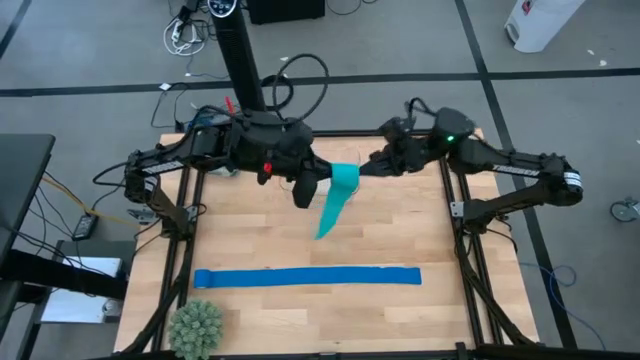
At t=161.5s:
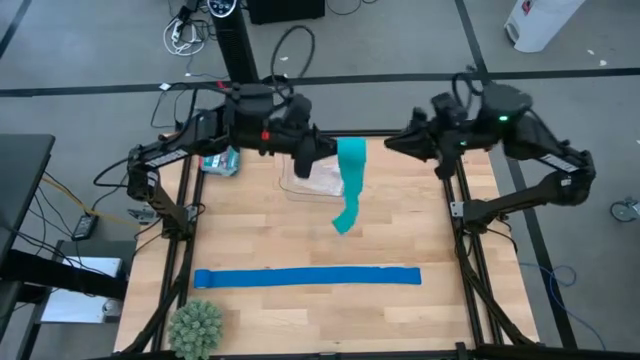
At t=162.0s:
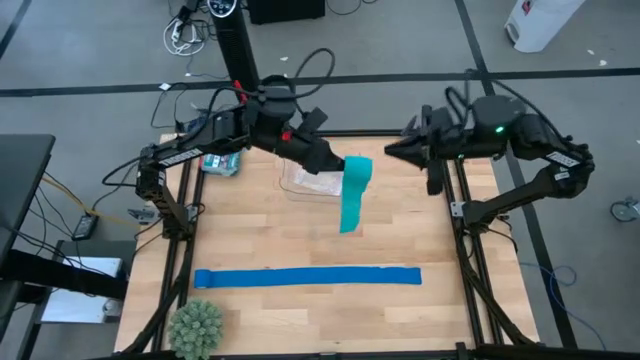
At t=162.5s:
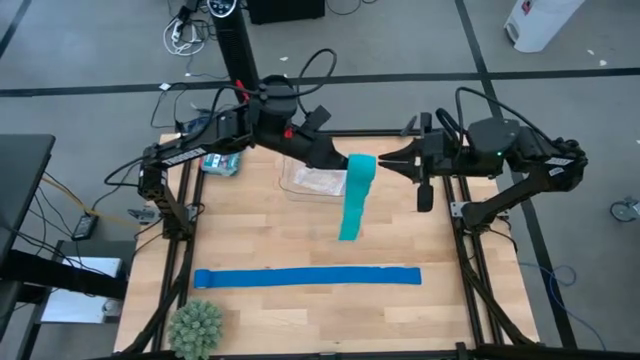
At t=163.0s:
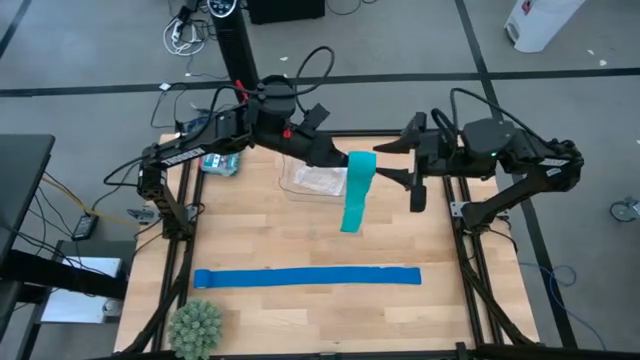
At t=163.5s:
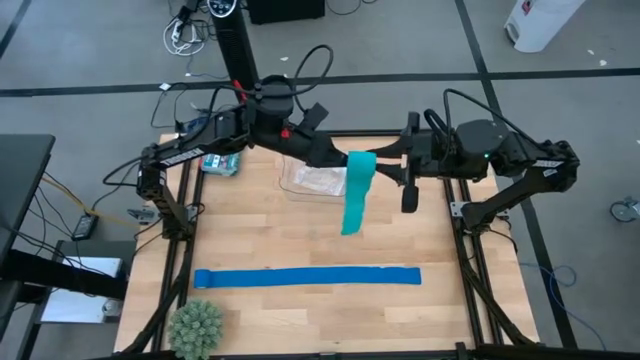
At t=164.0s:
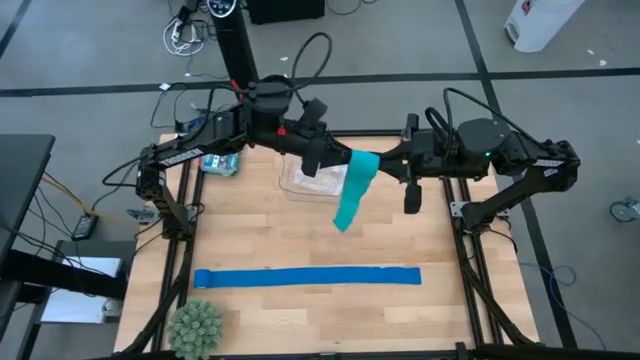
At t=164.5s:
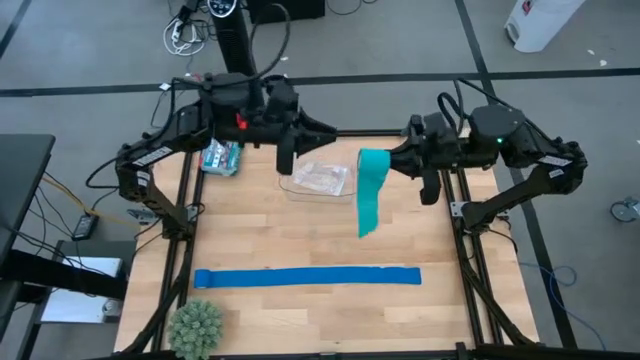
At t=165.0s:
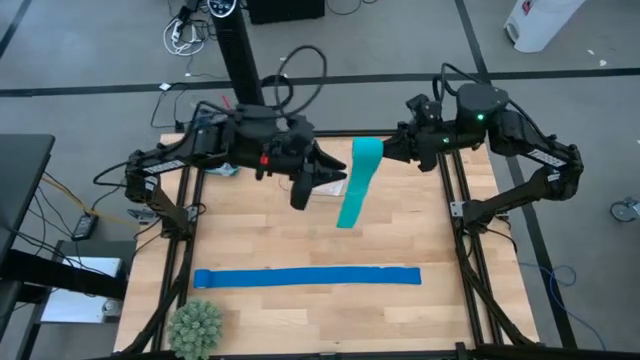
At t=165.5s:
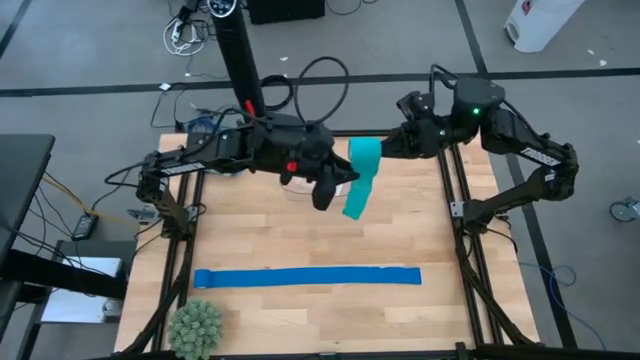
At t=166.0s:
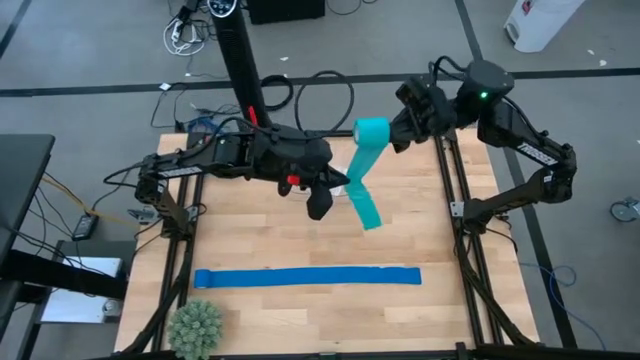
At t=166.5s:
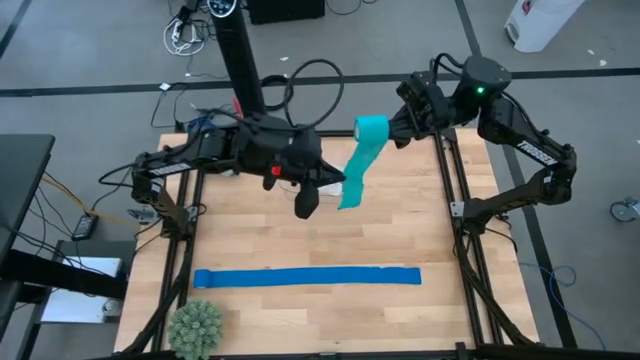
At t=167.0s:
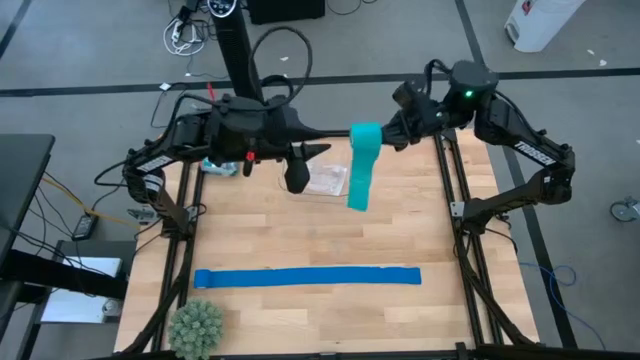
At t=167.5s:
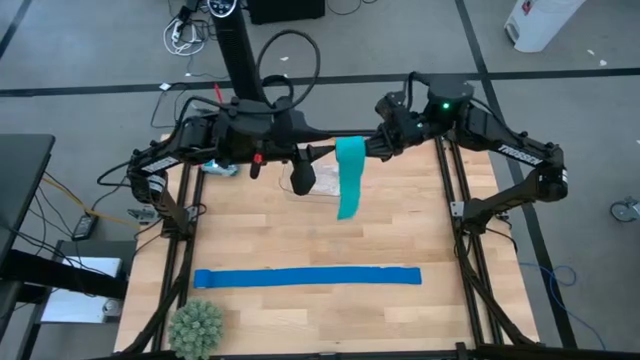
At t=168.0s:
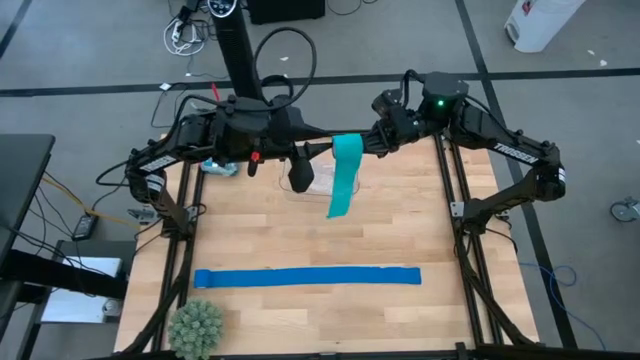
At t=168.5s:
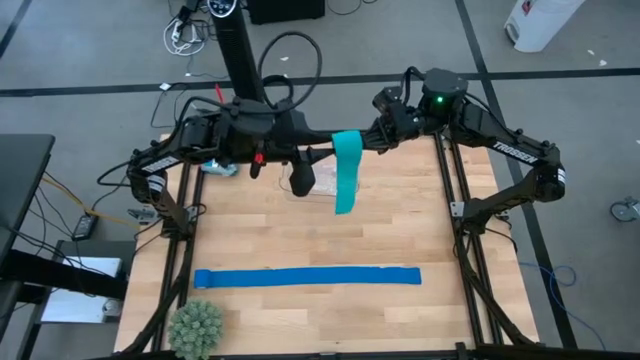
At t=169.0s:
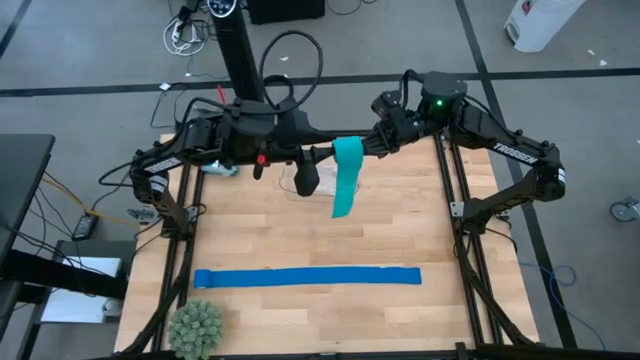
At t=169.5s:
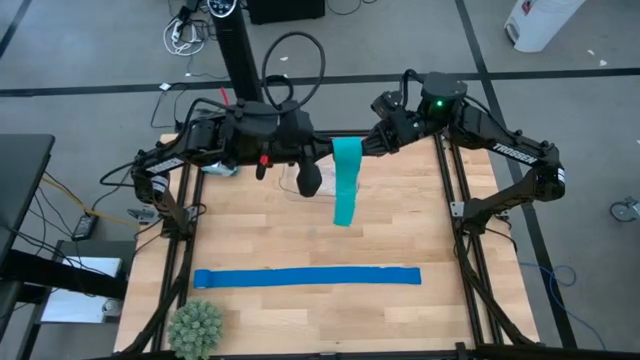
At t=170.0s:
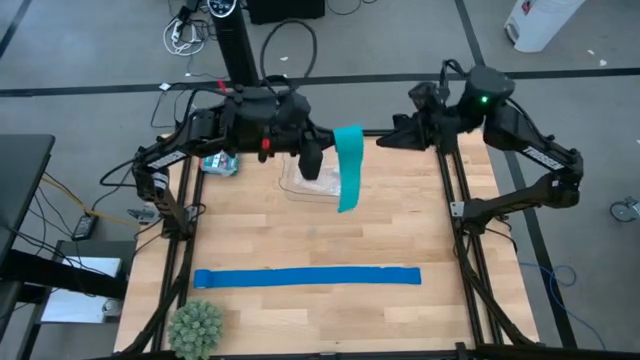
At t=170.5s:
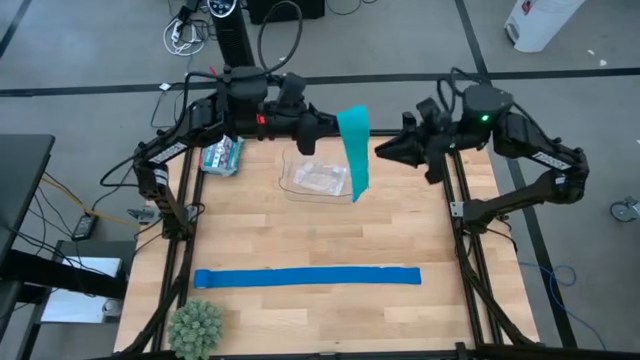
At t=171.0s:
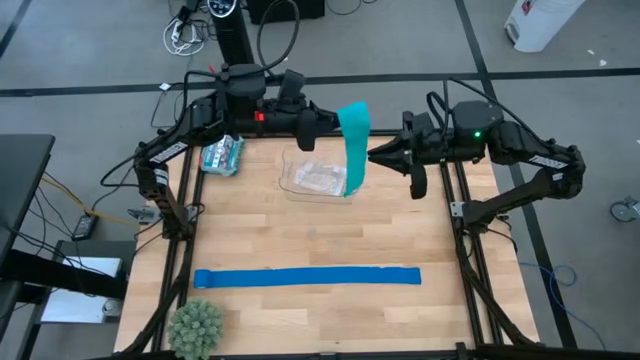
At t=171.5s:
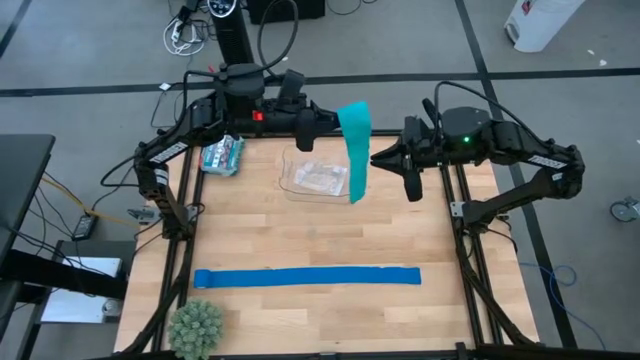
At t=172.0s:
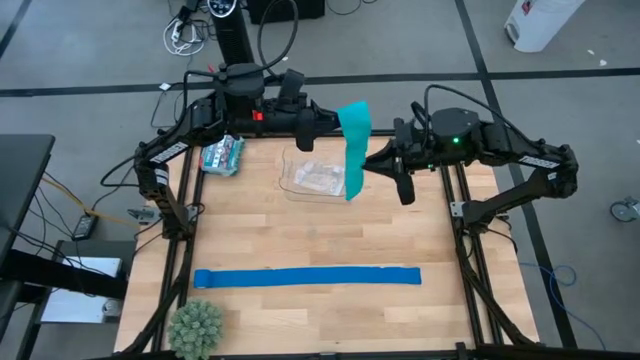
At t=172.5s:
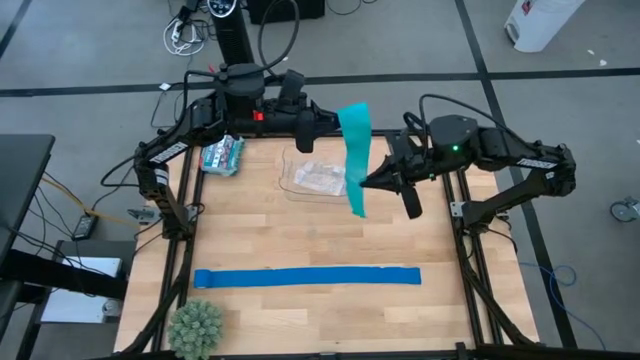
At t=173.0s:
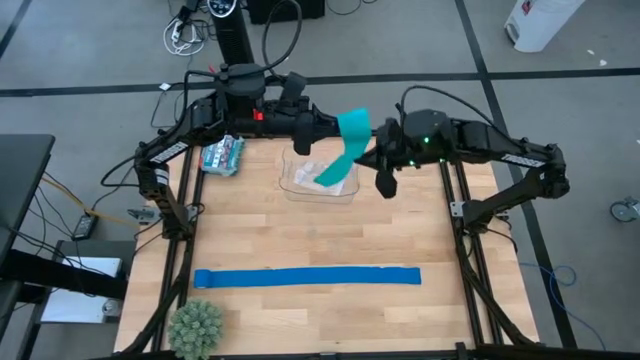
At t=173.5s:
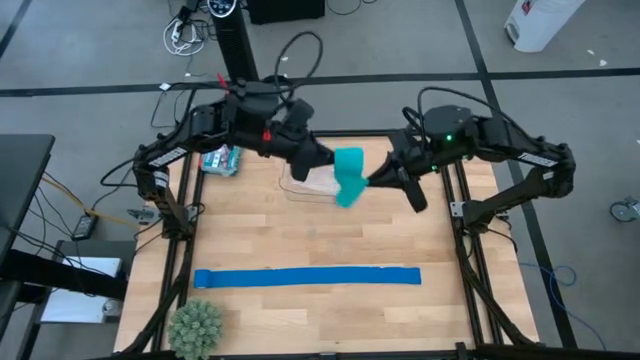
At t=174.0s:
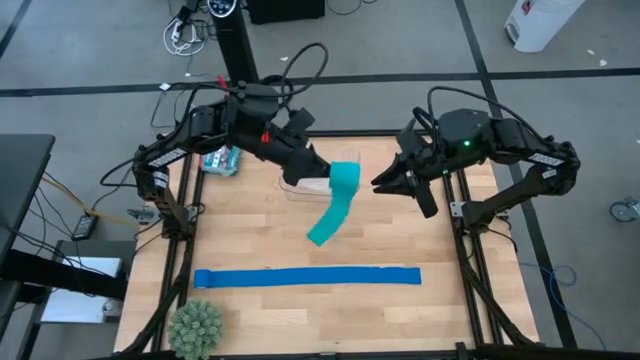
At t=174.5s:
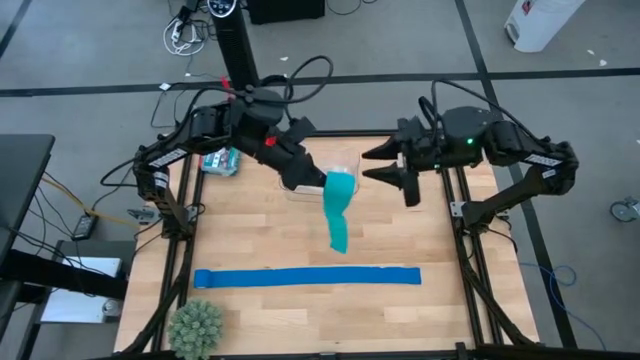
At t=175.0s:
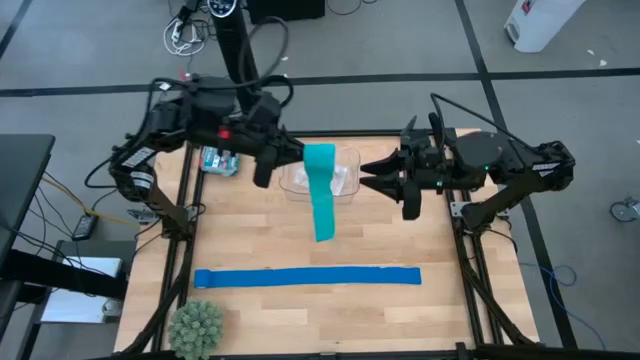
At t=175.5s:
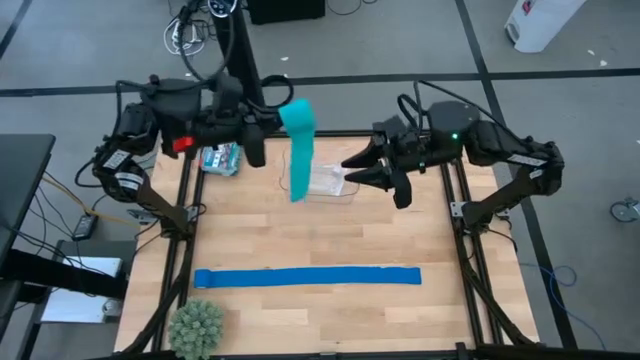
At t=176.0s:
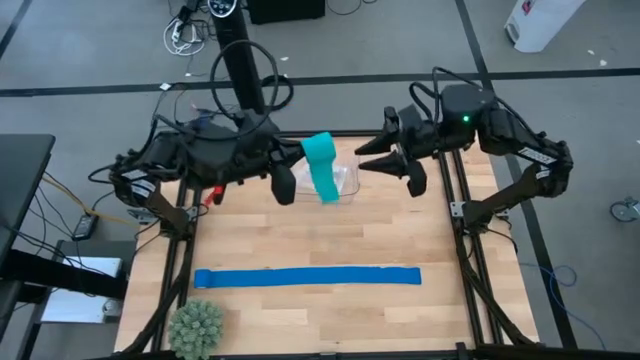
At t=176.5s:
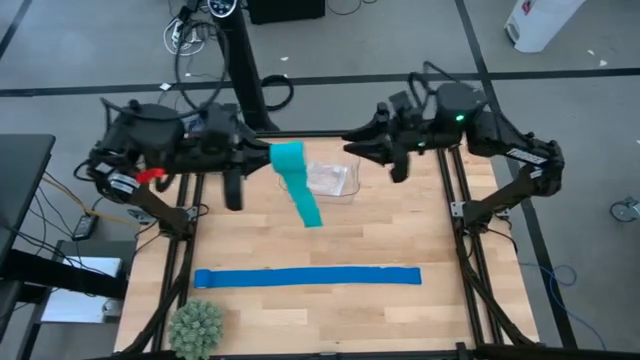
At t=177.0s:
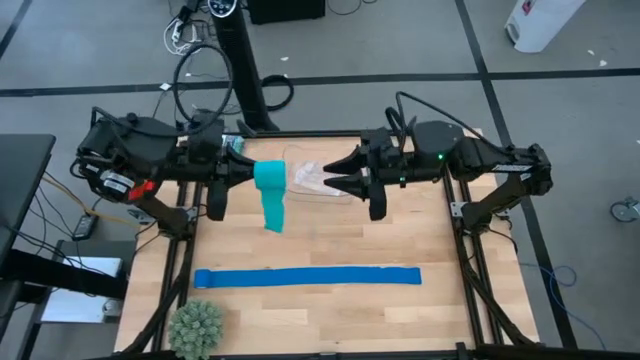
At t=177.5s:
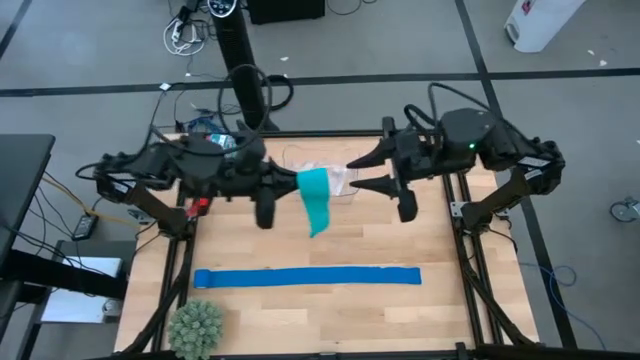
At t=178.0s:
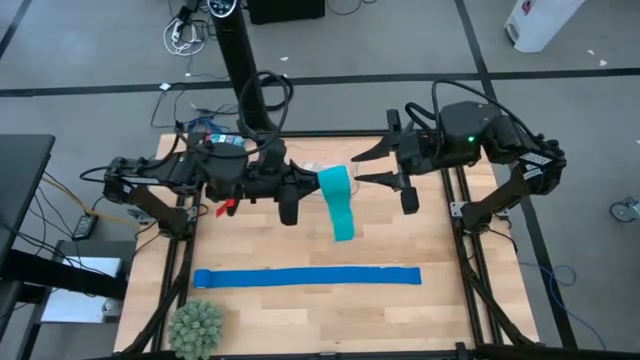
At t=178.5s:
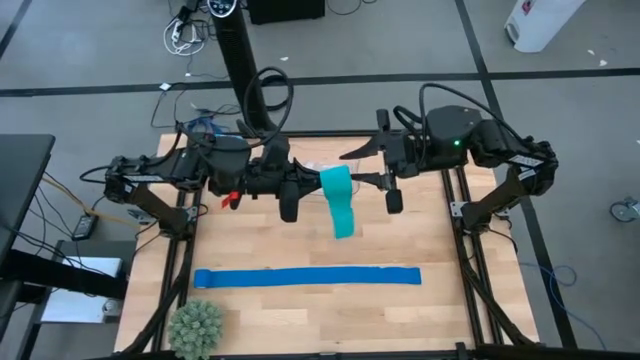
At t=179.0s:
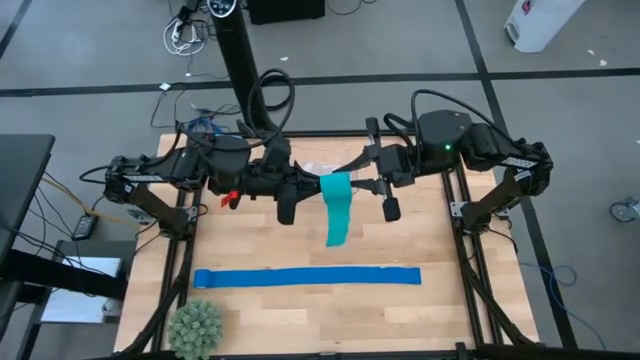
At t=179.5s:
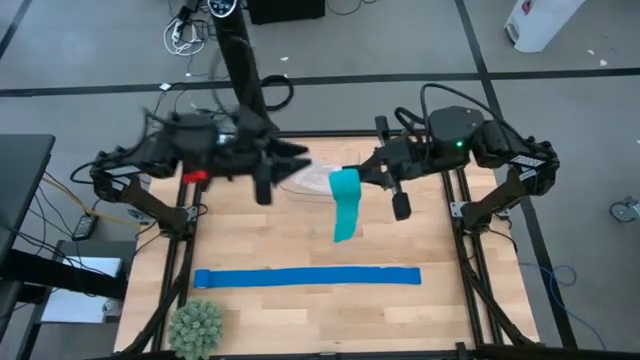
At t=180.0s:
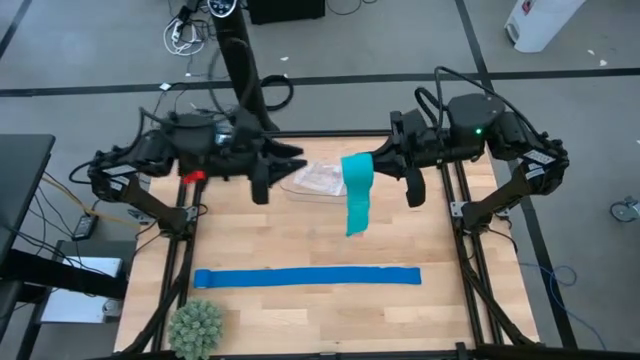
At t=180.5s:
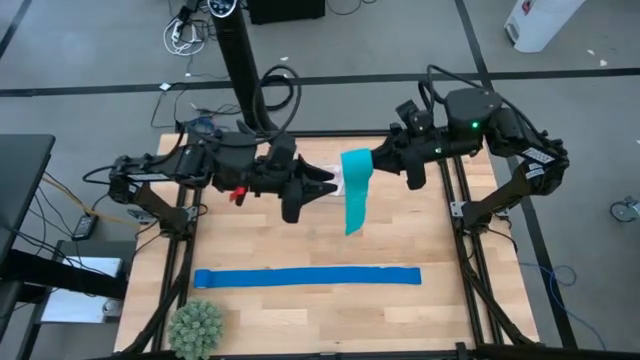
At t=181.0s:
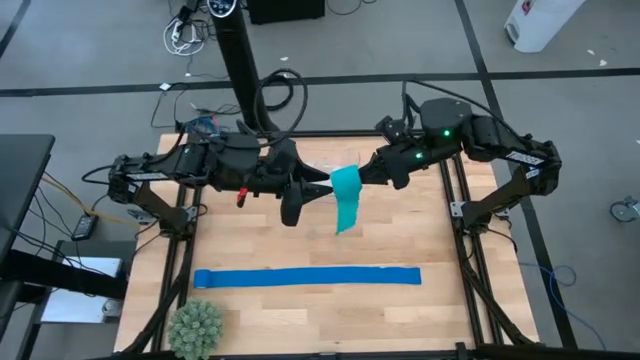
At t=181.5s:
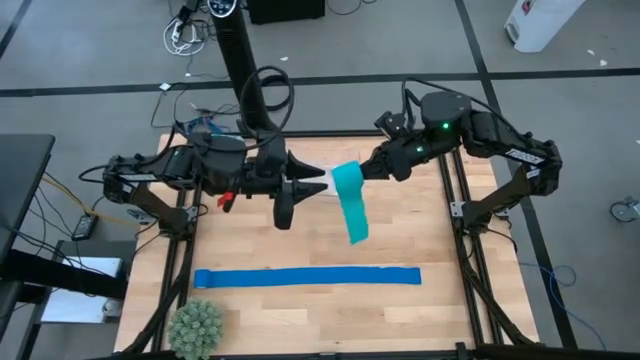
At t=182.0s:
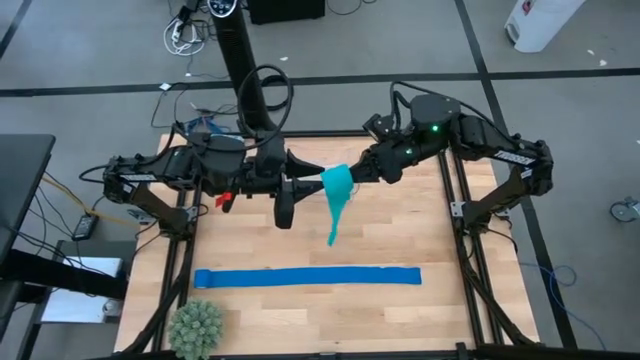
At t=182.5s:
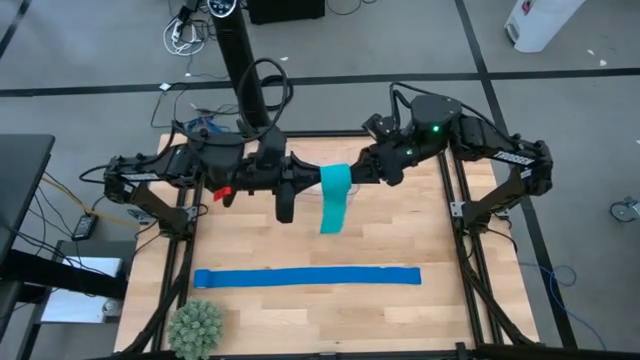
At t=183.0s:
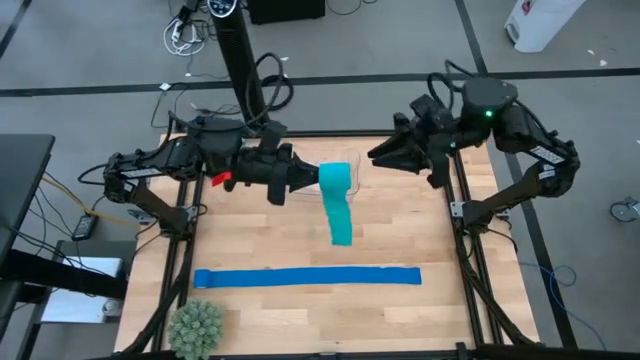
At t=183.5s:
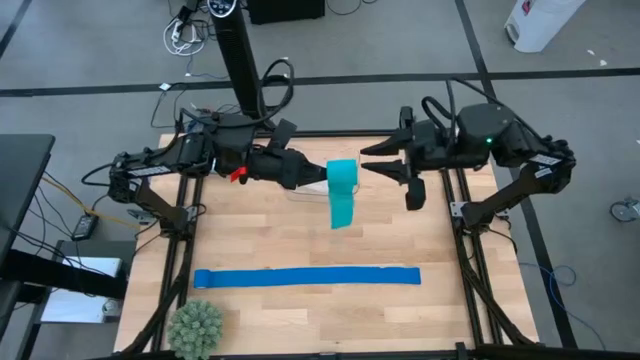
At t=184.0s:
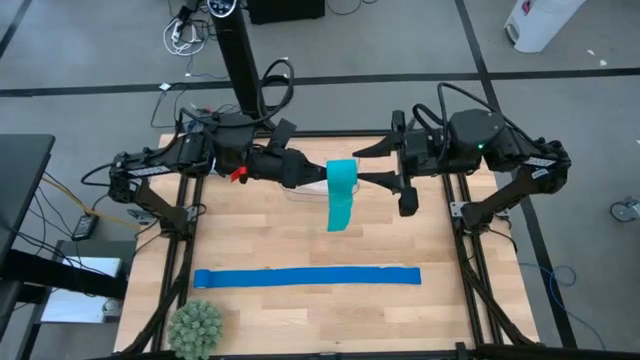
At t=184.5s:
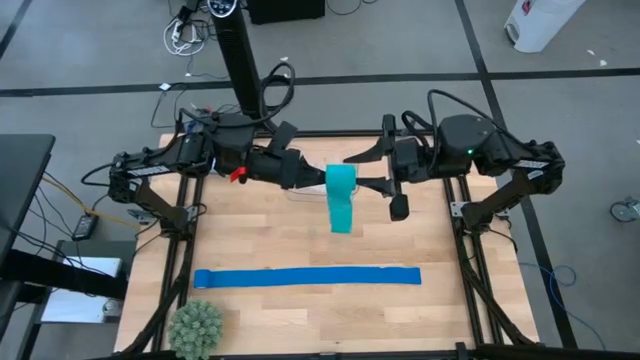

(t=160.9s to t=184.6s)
Task: Roll bandage
Roll the green bandage
